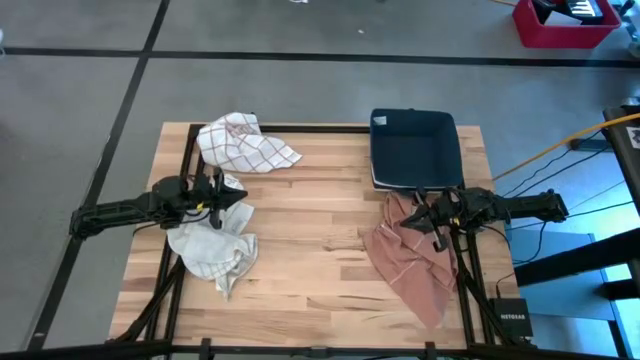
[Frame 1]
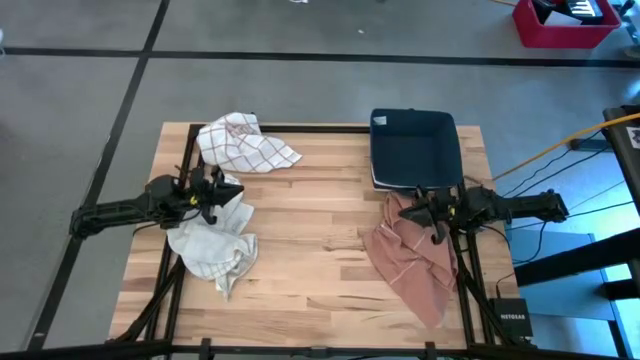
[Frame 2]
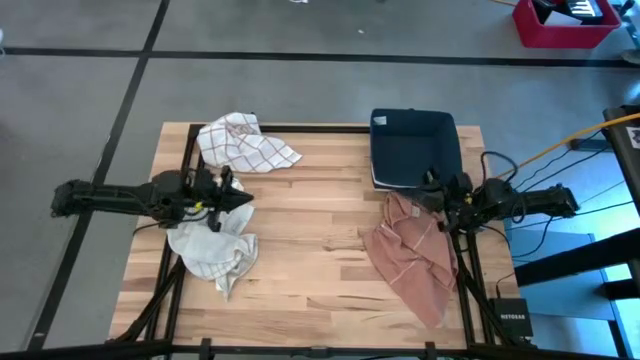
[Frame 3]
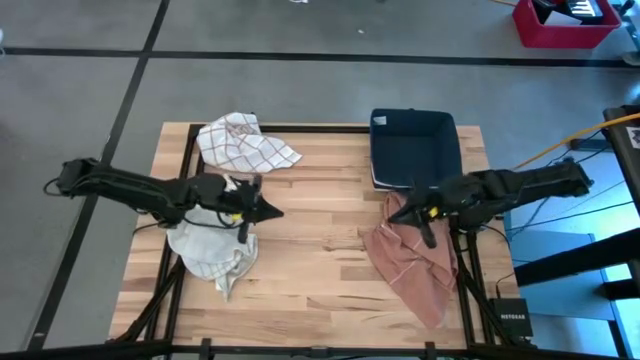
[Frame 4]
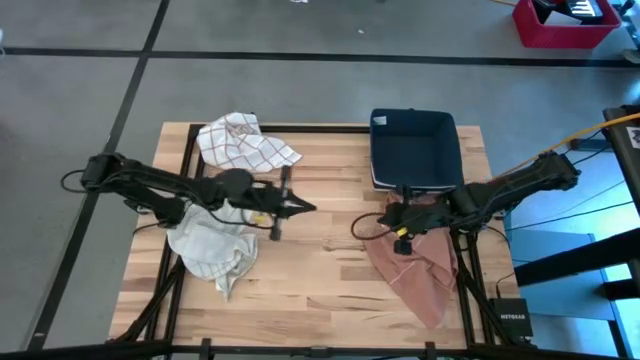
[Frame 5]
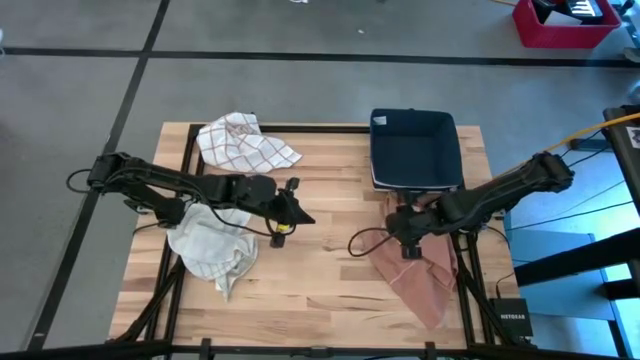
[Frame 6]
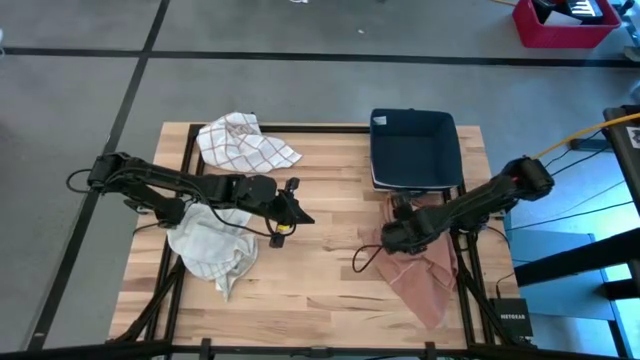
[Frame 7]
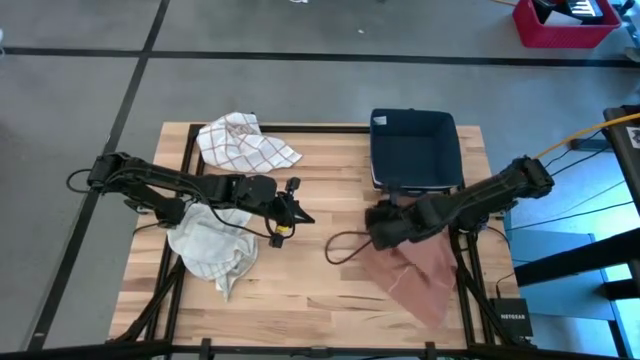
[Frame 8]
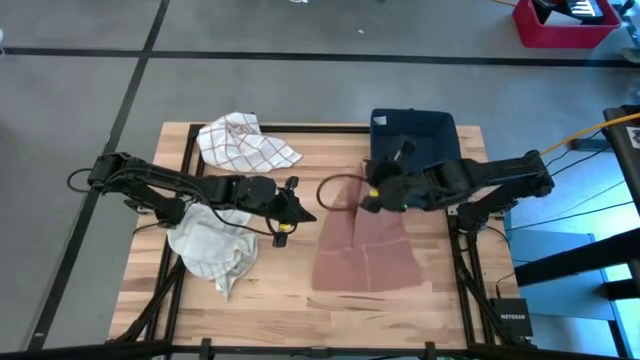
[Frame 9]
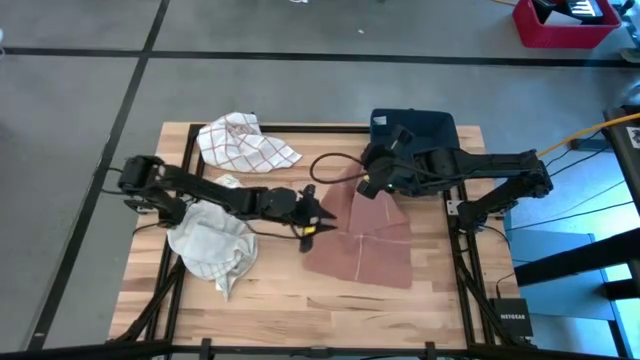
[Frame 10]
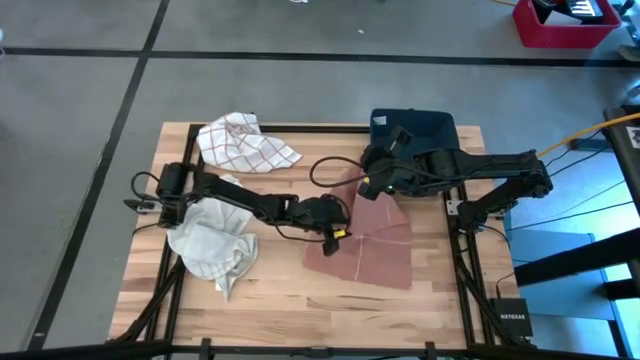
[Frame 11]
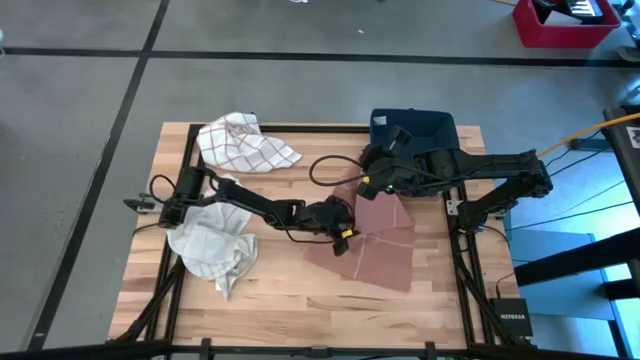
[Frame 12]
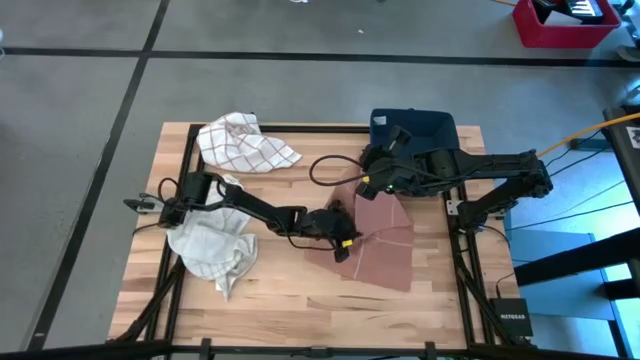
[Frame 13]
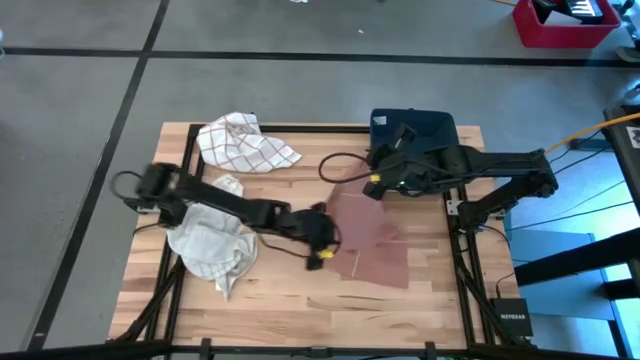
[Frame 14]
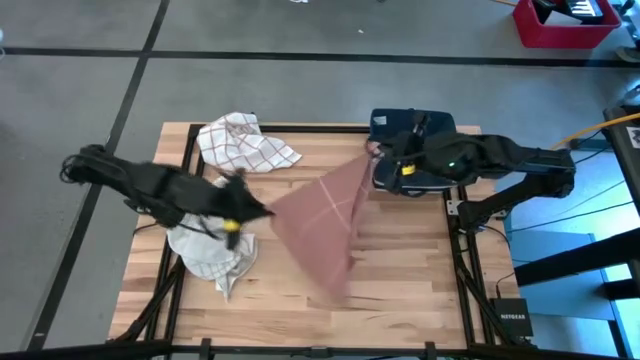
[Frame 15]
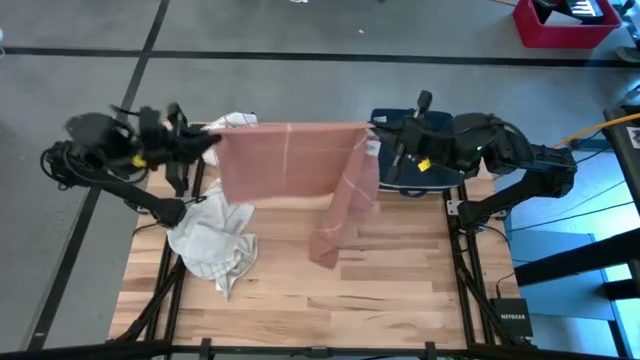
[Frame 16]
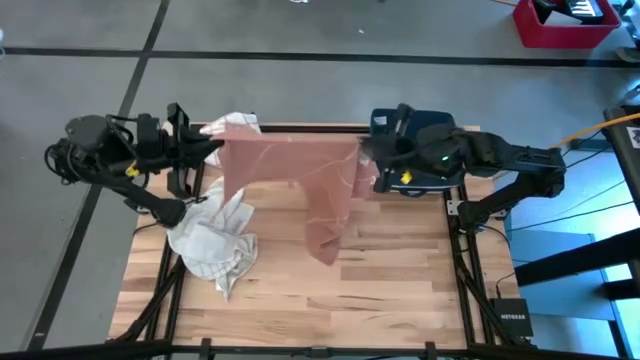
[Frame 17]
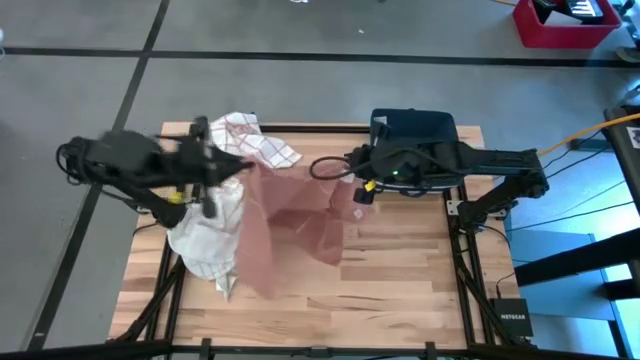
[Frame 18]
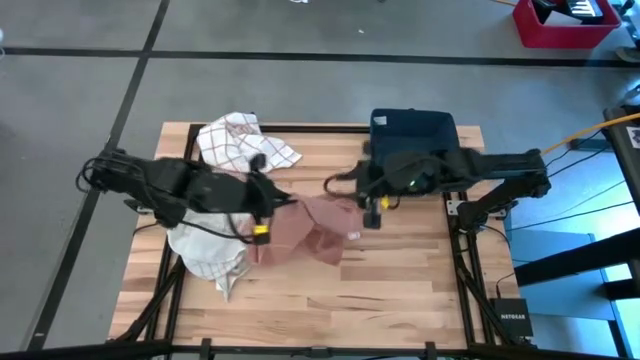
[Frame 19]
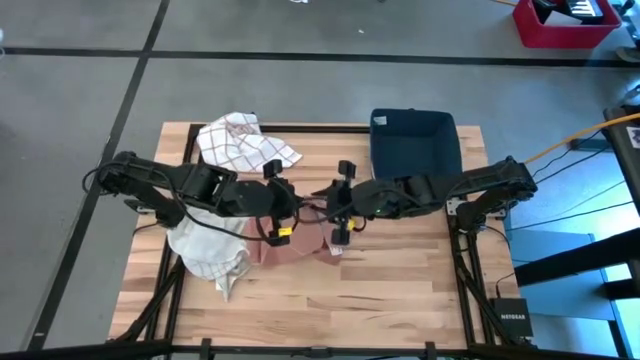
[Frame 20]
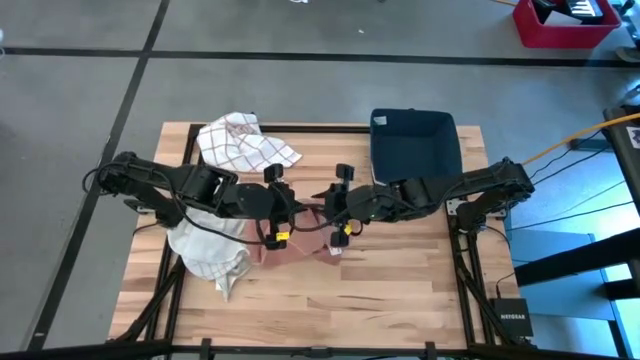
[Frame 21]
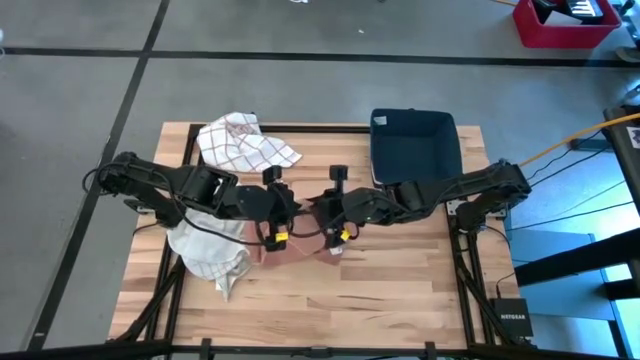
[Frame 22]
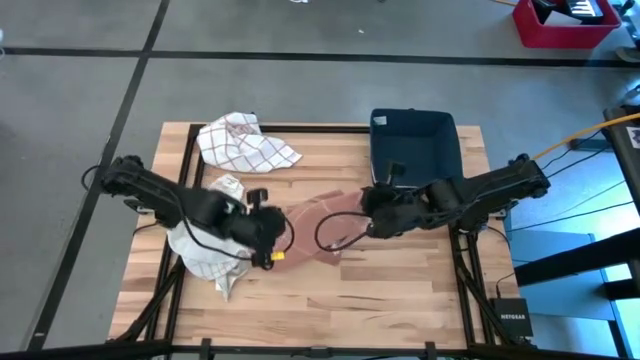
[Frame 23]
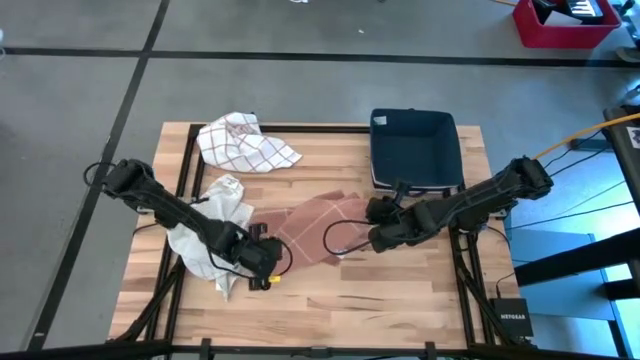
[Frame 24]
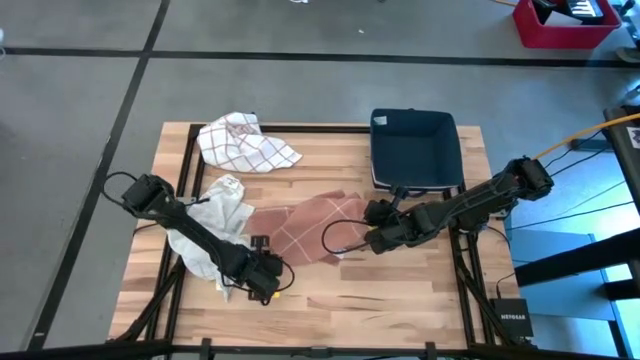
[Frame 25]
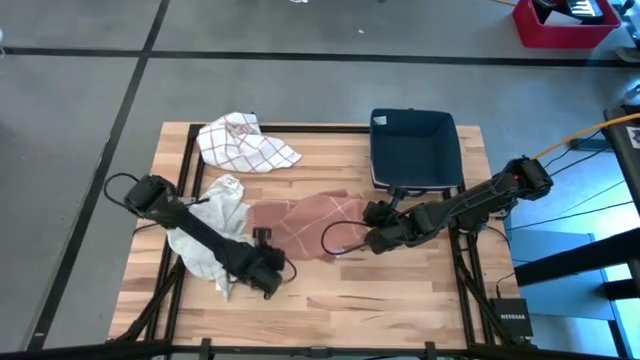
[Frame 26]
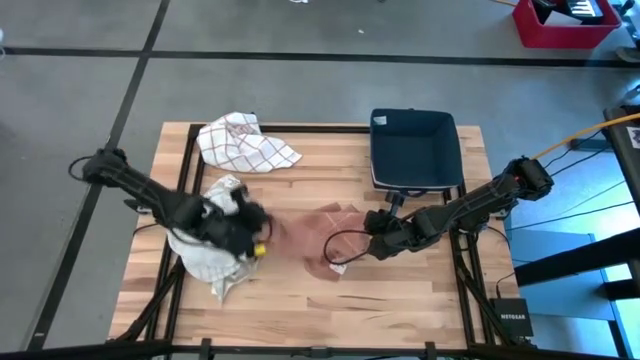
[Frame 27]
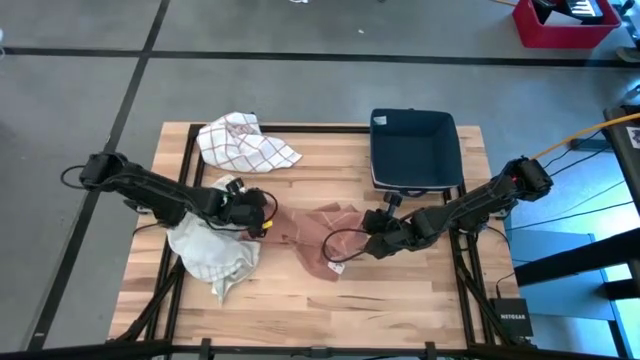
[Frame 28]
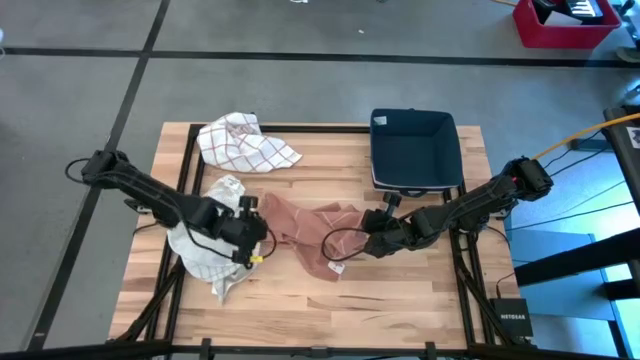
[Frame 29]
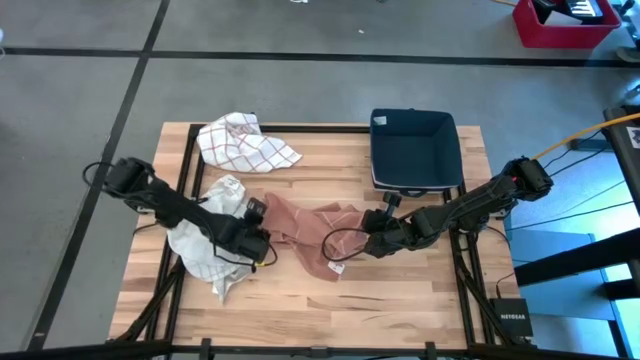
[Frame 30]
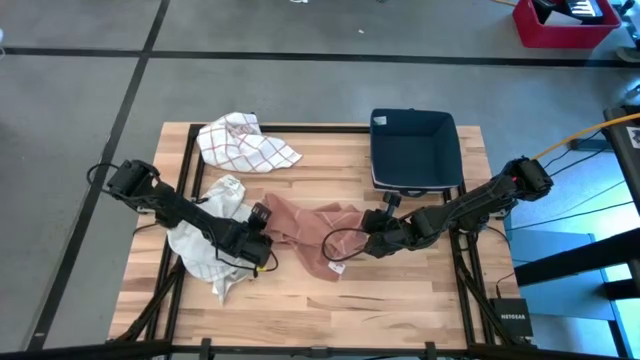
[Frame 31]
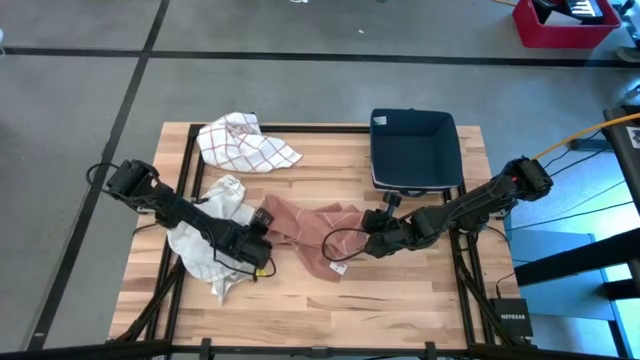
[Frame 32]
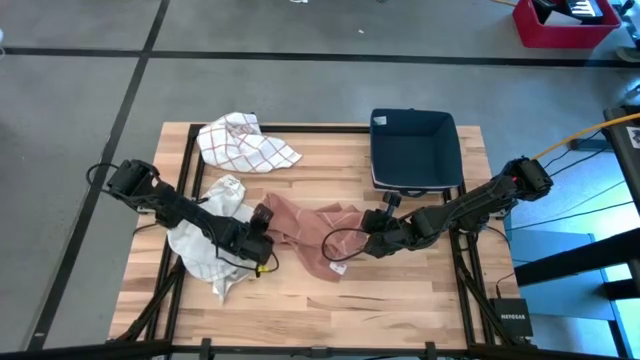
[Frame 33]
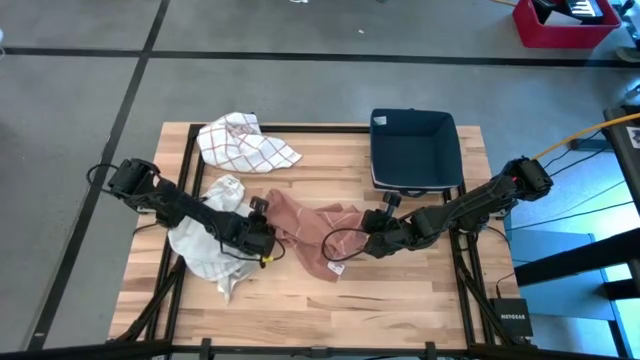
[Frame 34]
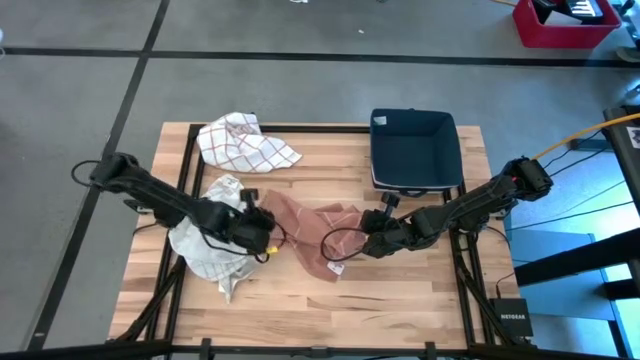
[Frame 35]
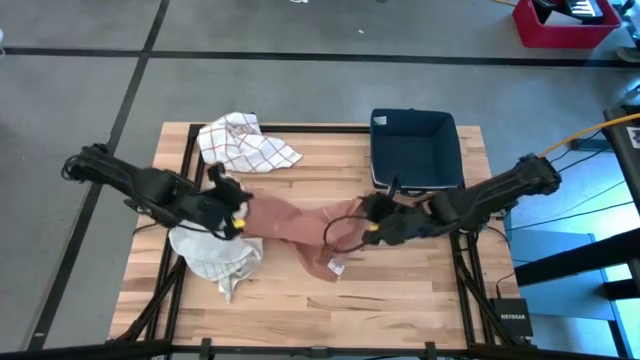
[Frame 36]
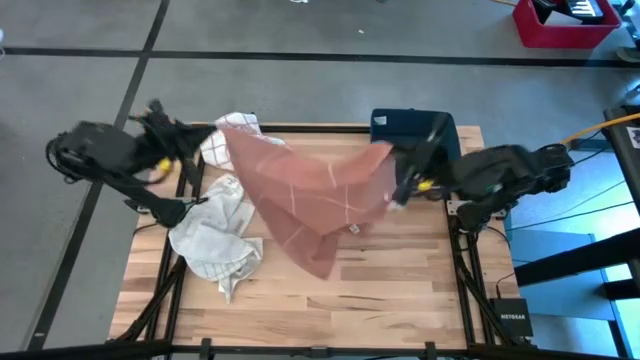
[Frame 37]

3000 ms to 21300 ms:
Task: Fold towel
Fold the brown towel
